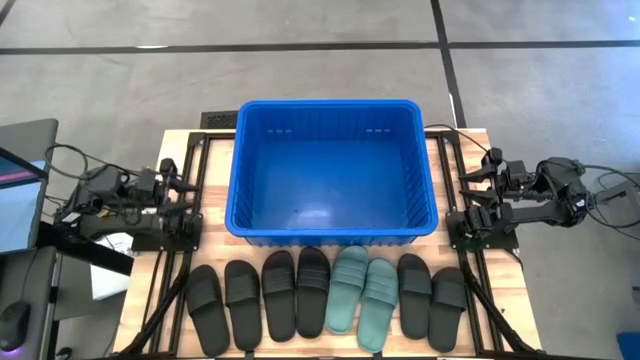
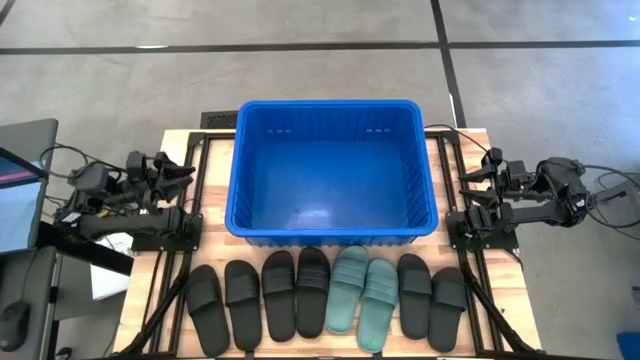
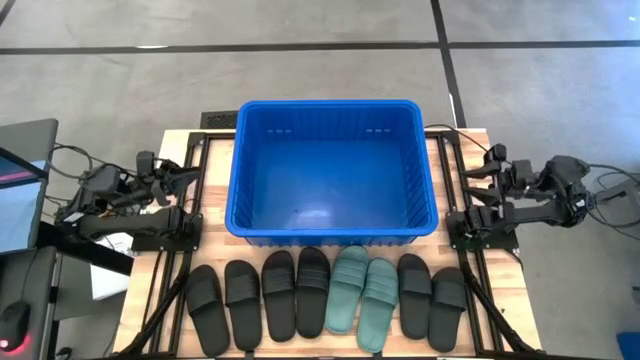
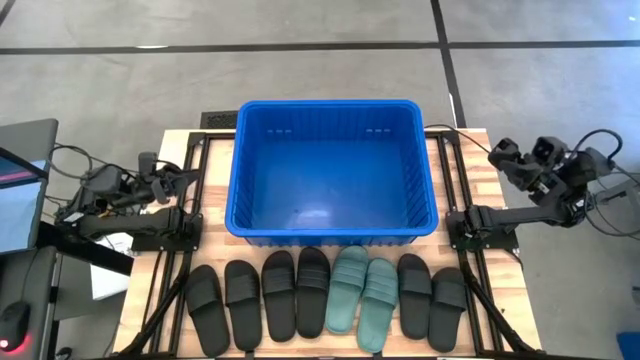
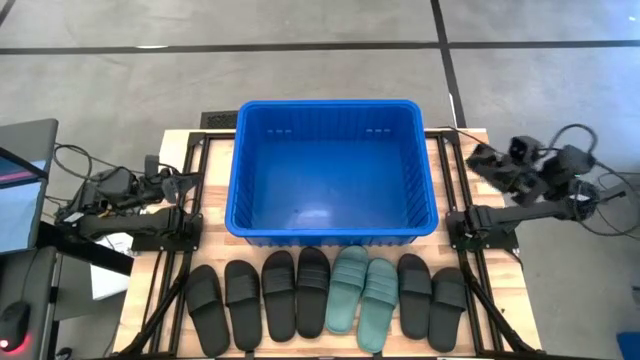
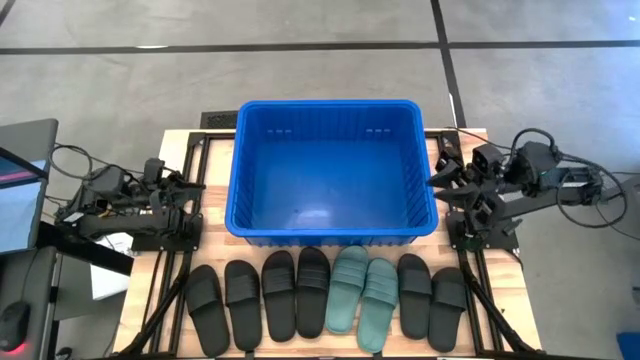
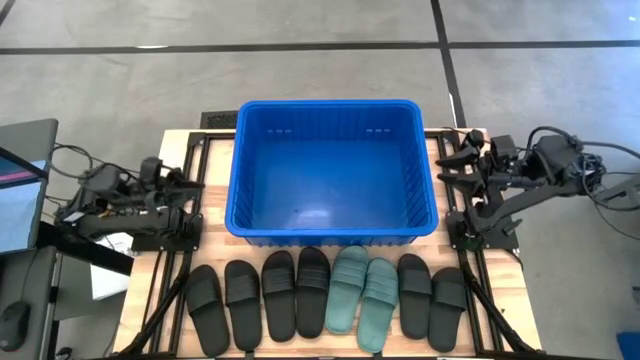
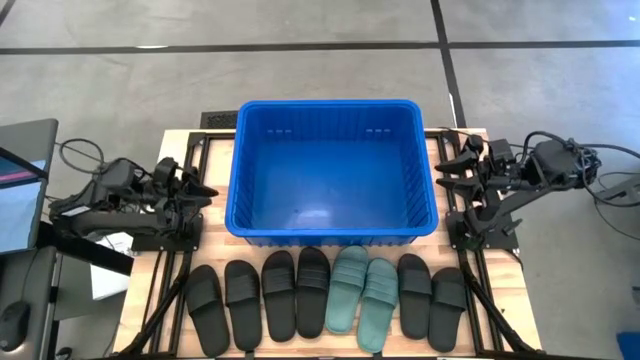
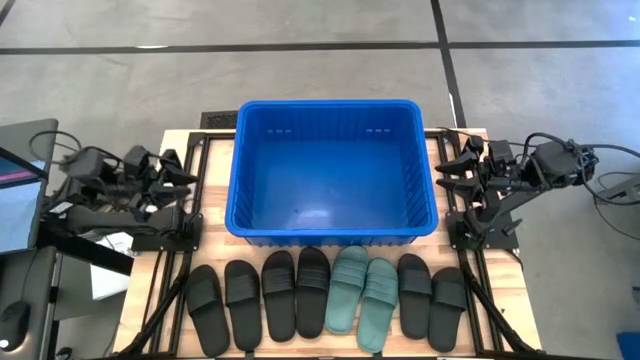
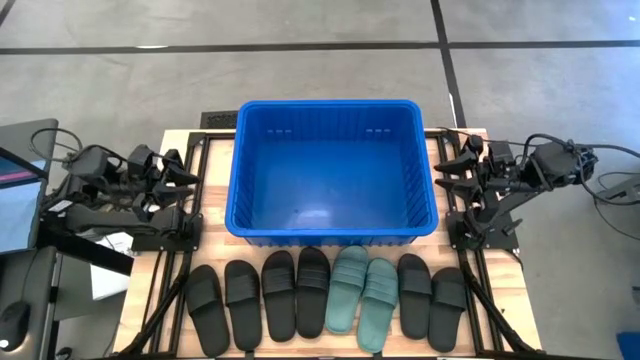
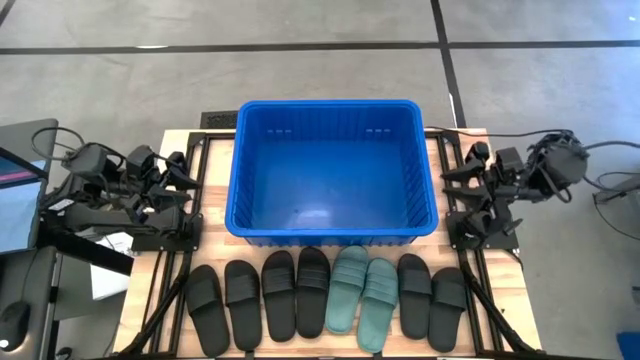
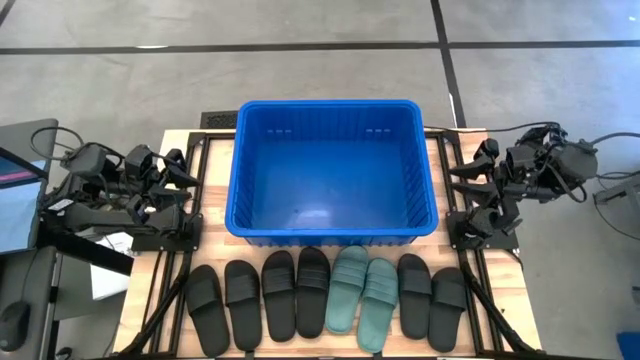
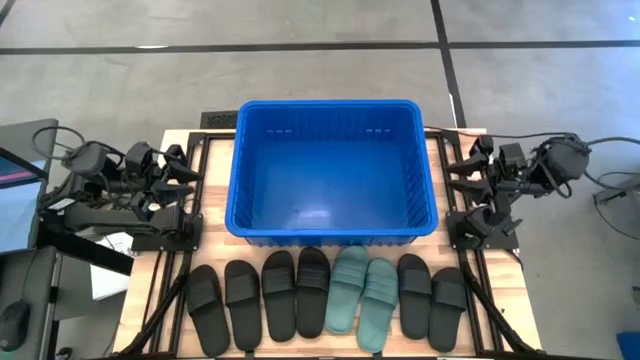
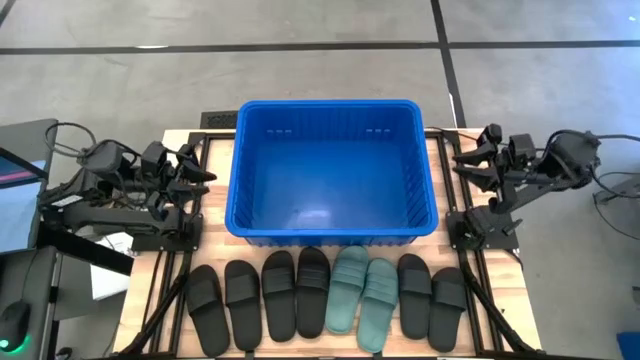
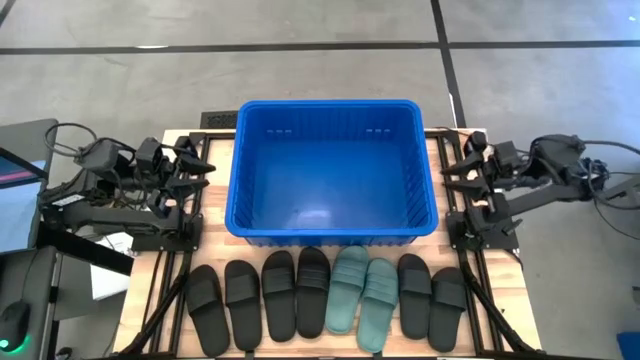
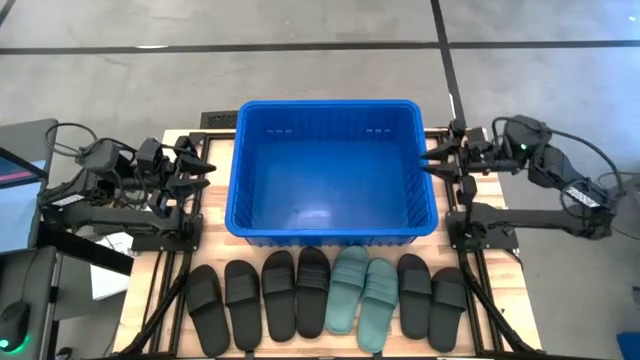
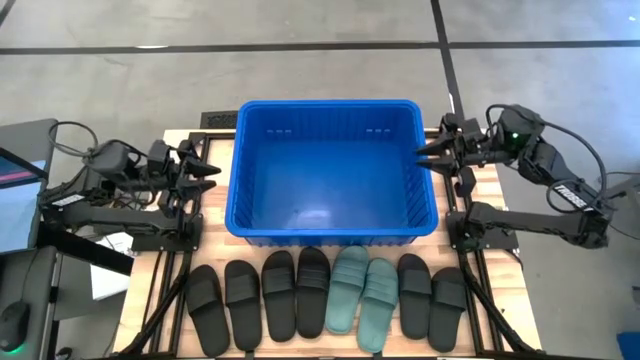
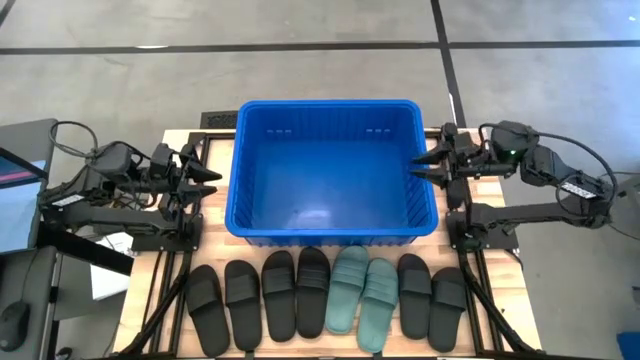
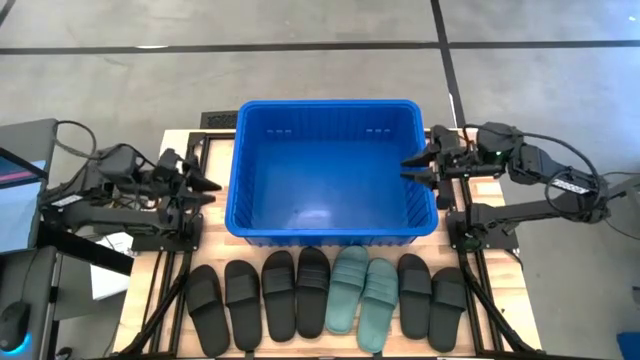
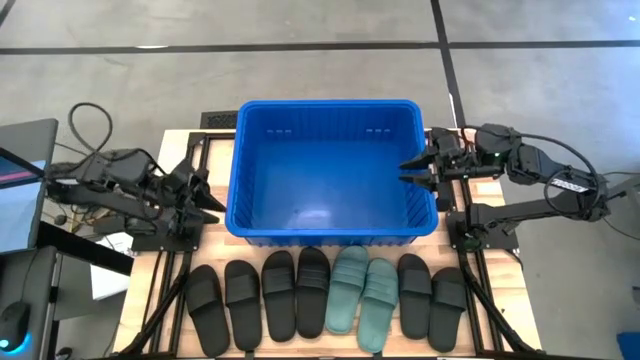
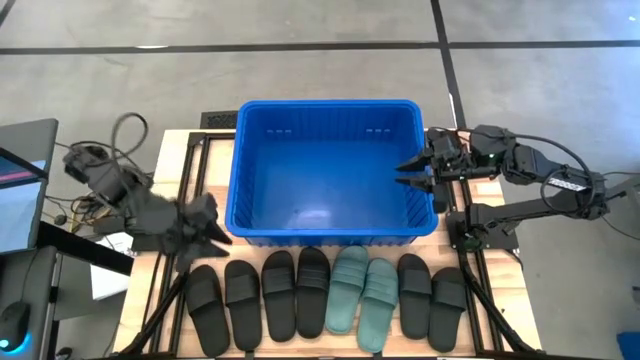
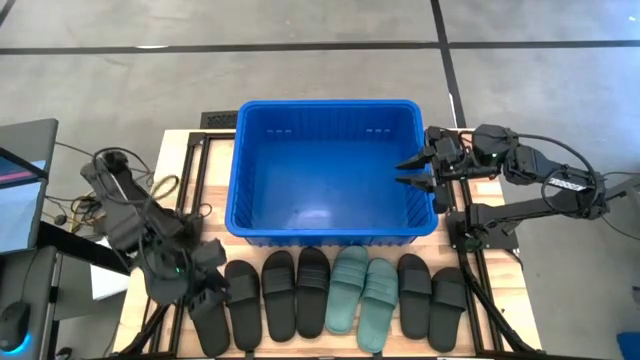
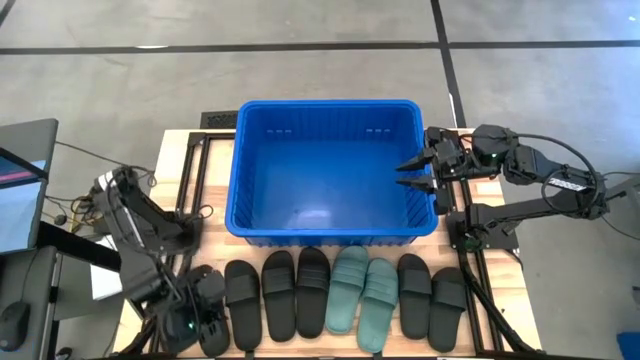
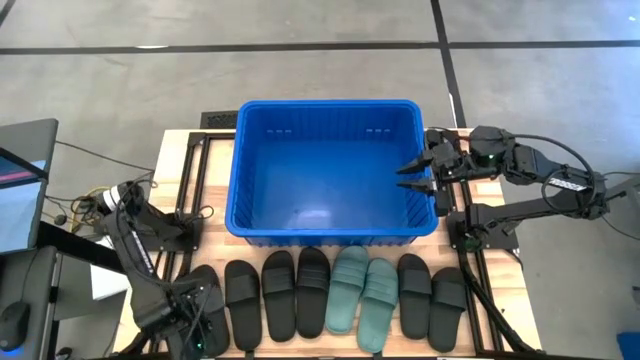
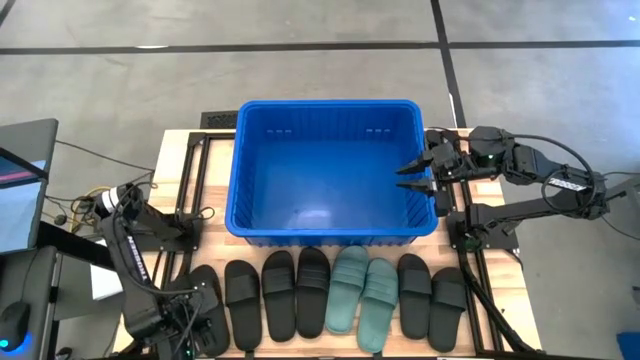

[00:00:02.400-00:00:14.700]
Task: Pick and place slides into bin
Put the black slide into the blue bin

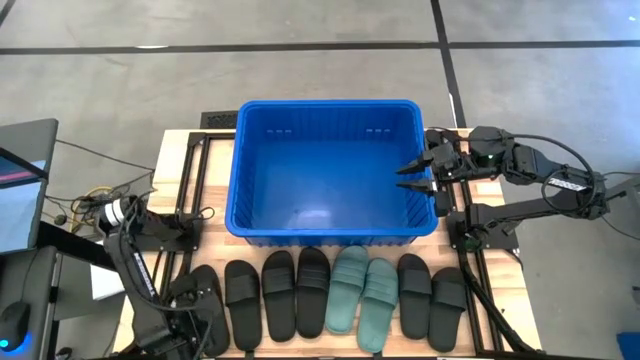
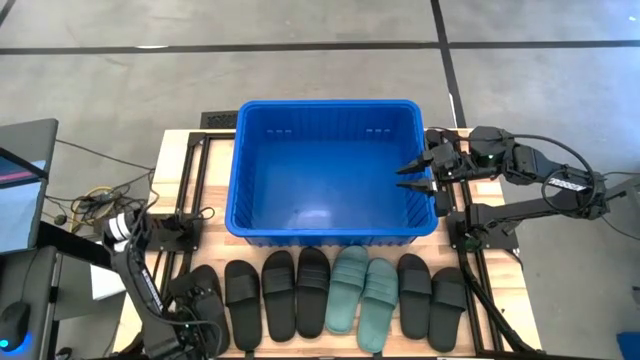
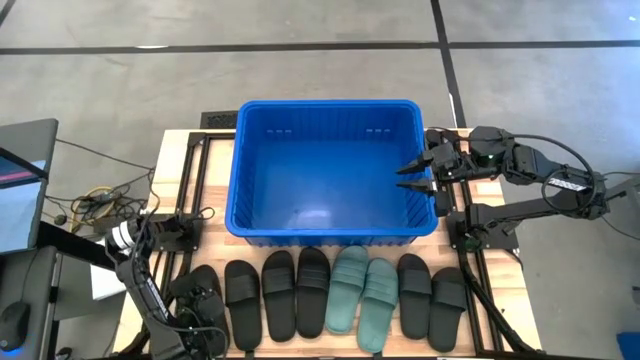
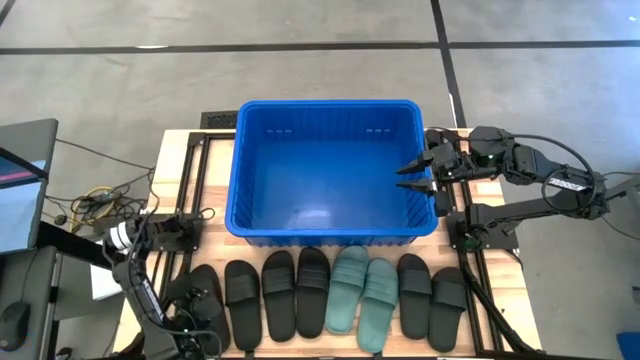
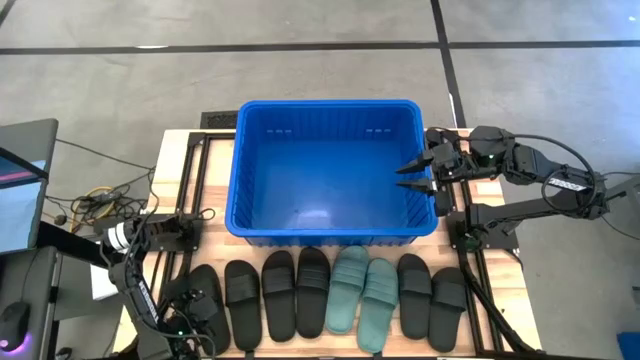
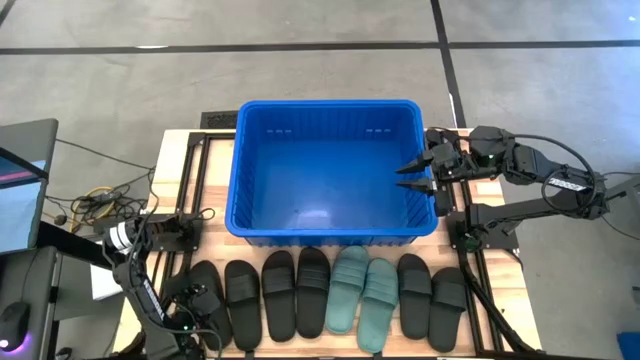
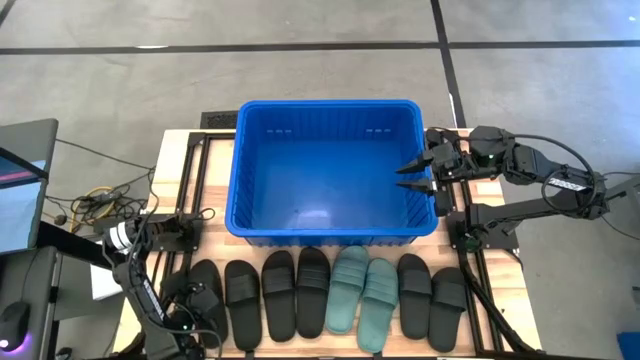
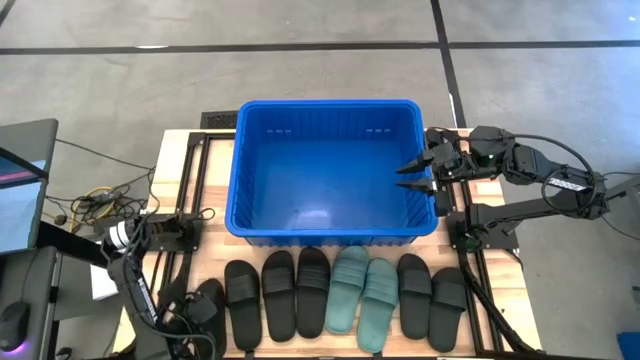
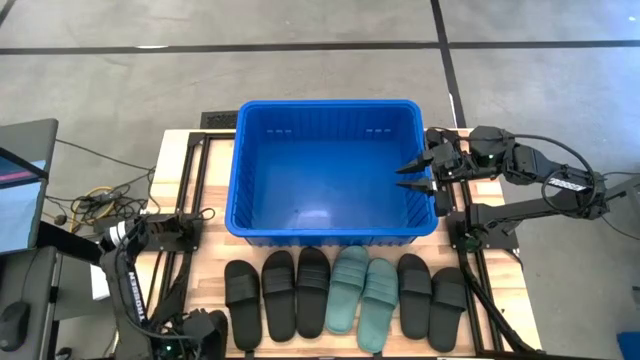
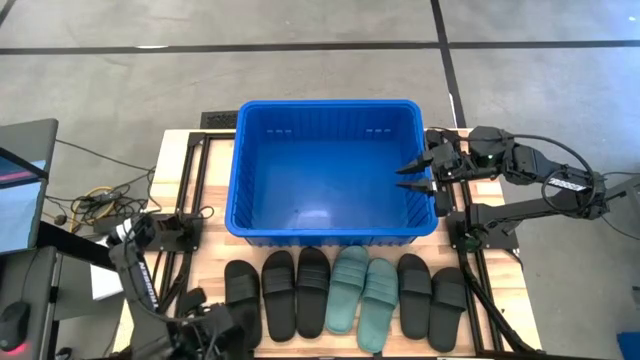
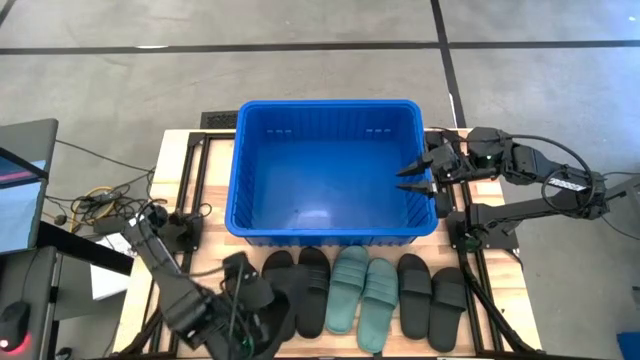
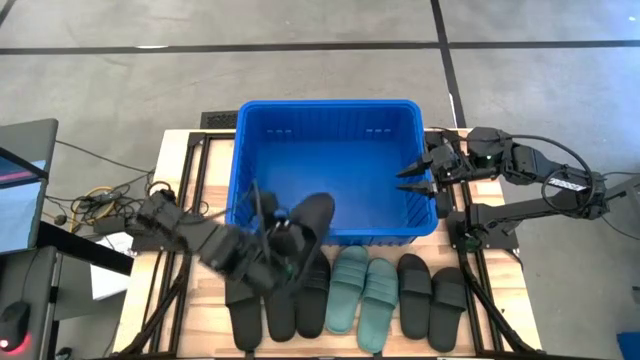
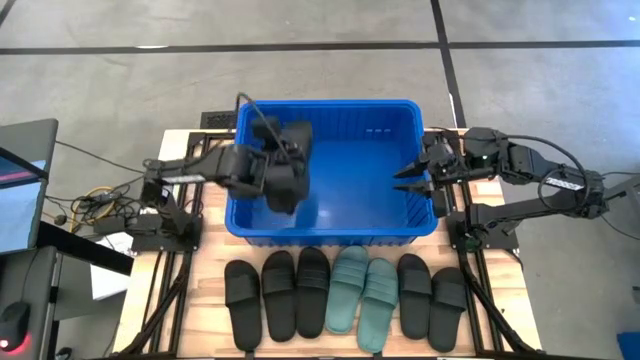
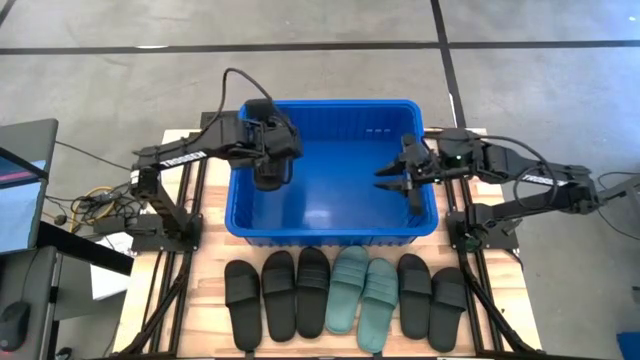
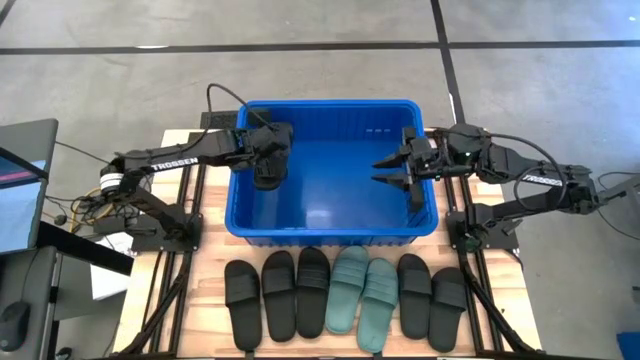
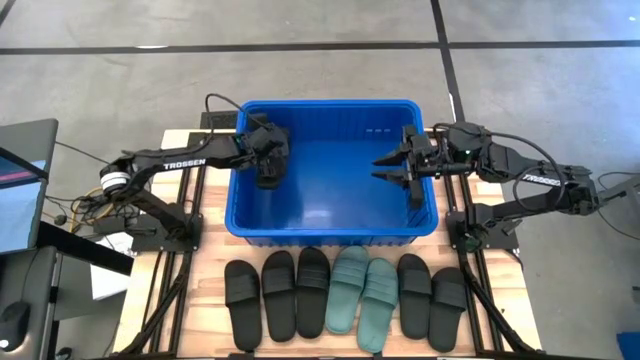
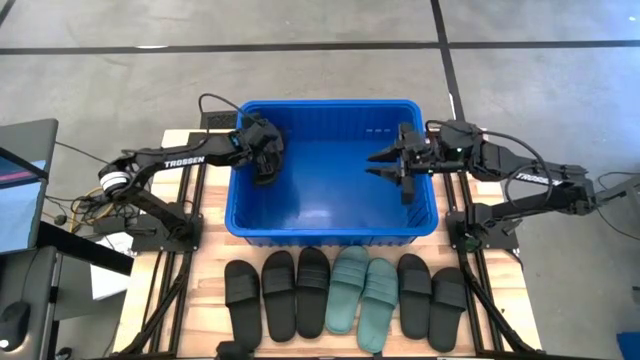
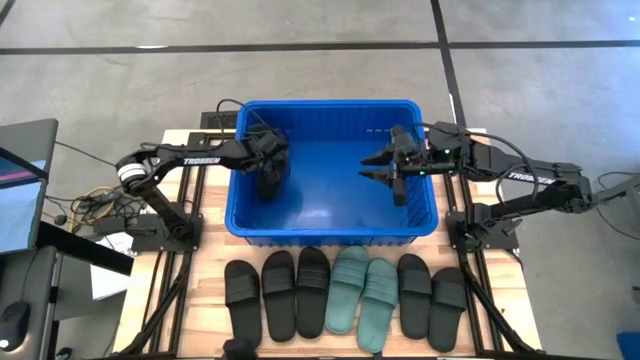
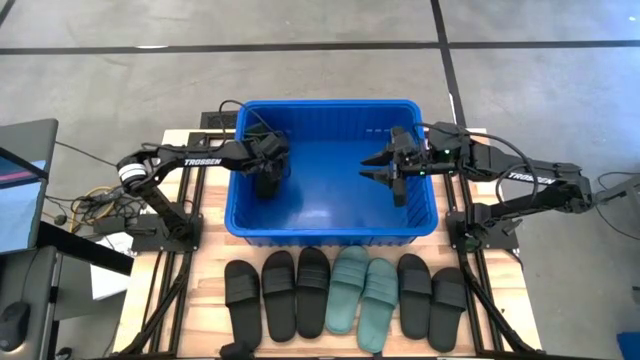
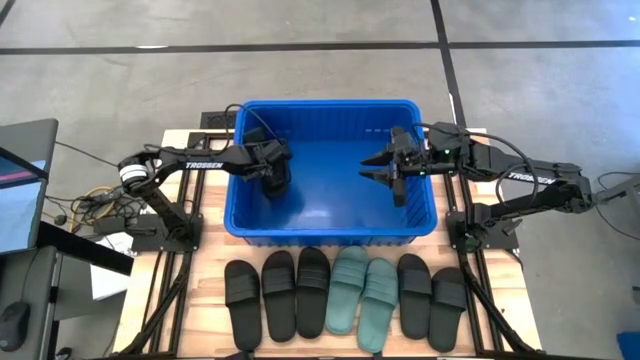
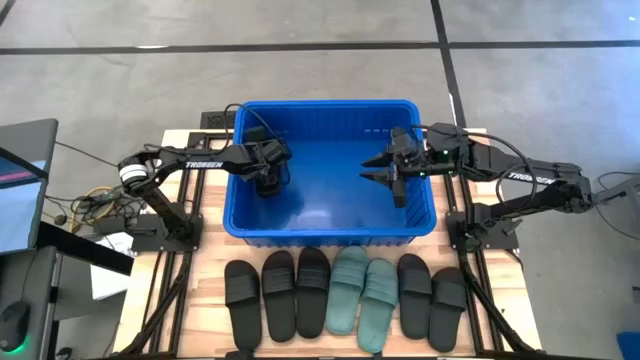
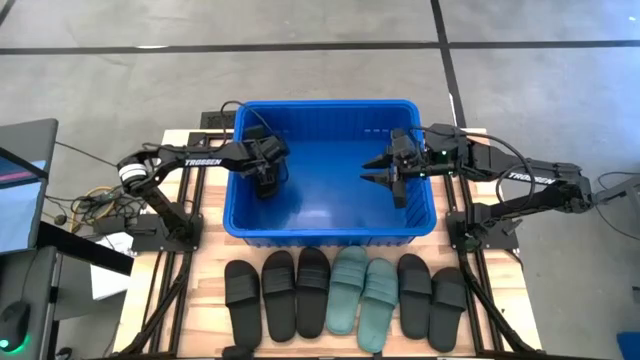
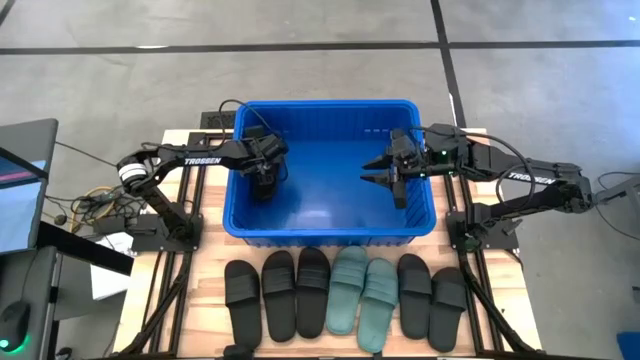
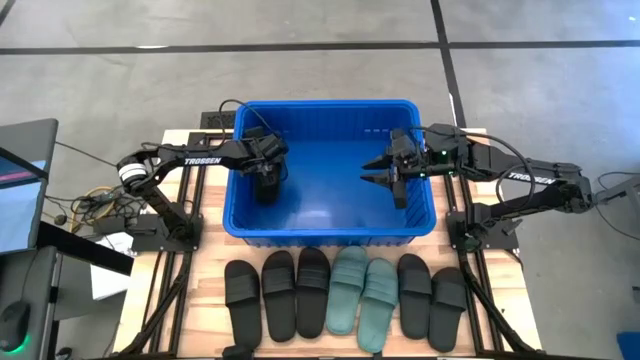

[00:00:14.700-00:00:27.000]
Put the black slide into the blue bin
